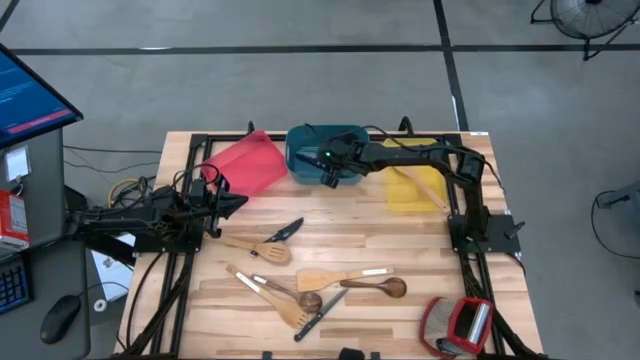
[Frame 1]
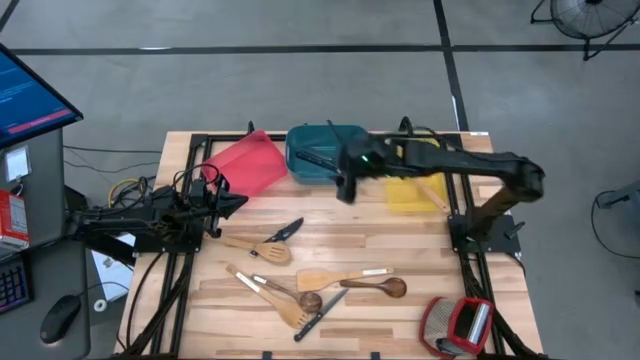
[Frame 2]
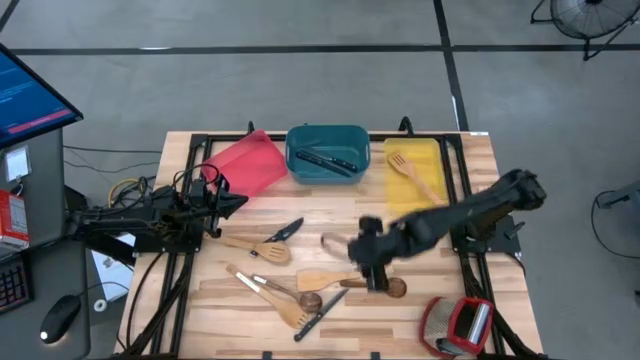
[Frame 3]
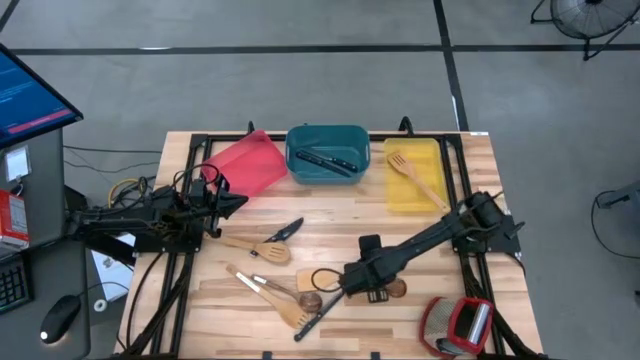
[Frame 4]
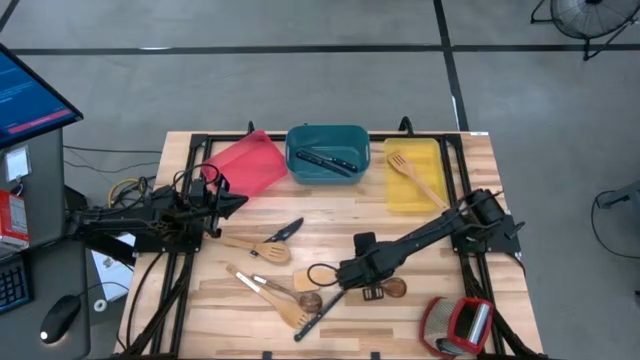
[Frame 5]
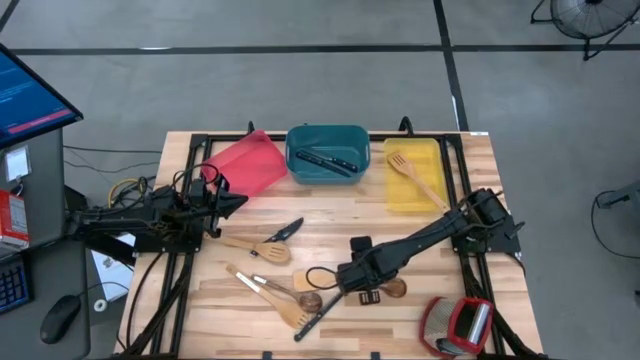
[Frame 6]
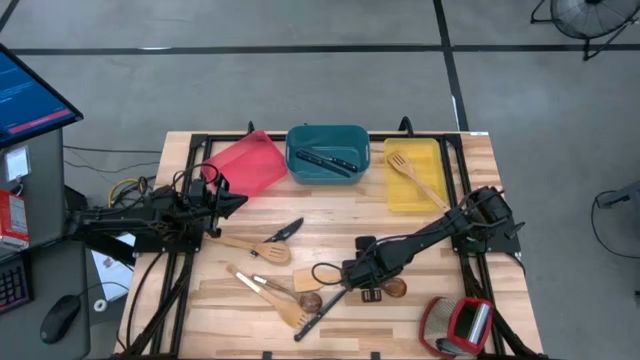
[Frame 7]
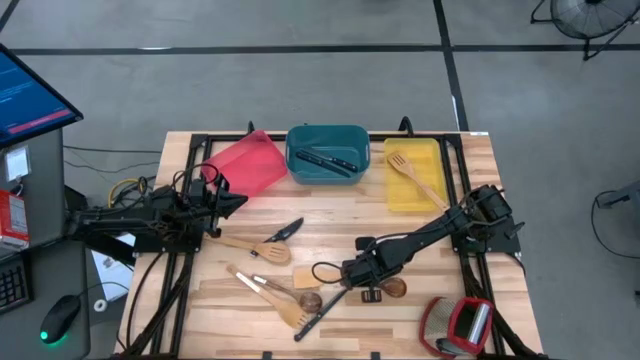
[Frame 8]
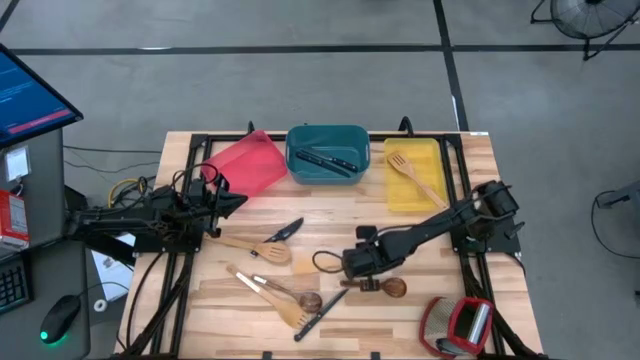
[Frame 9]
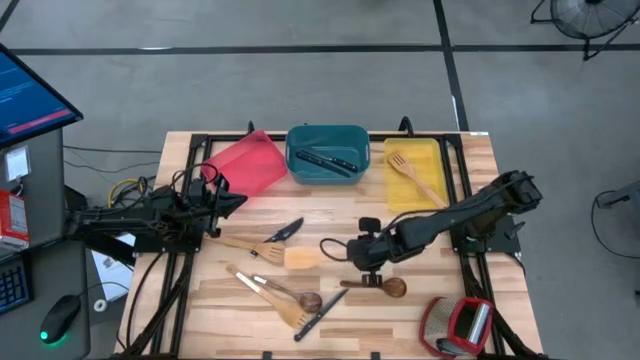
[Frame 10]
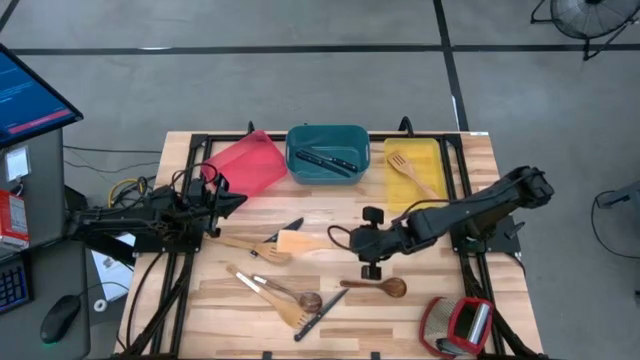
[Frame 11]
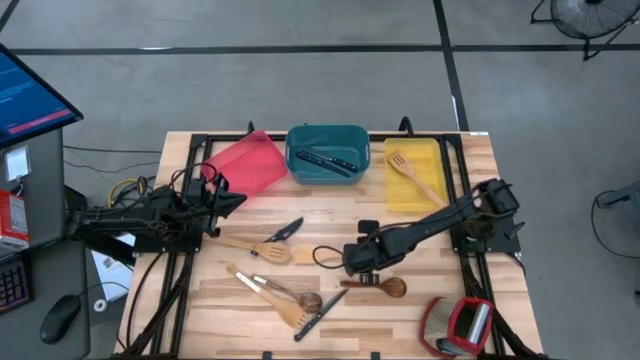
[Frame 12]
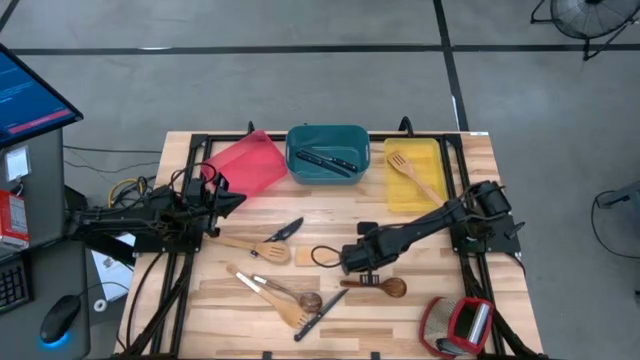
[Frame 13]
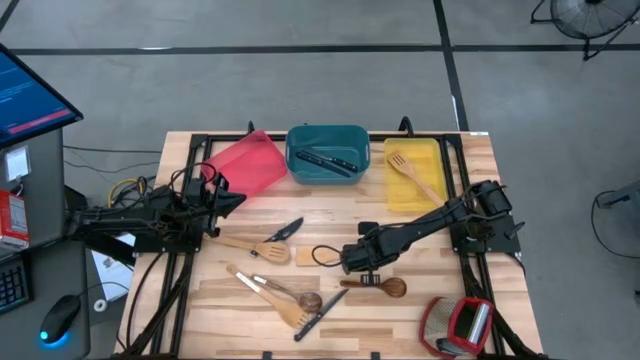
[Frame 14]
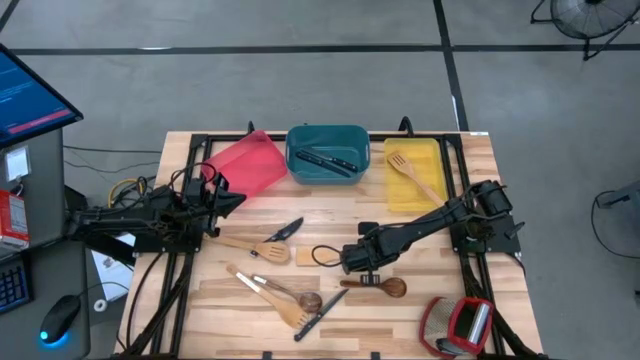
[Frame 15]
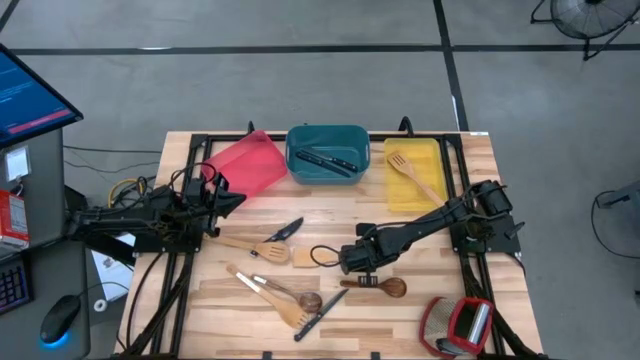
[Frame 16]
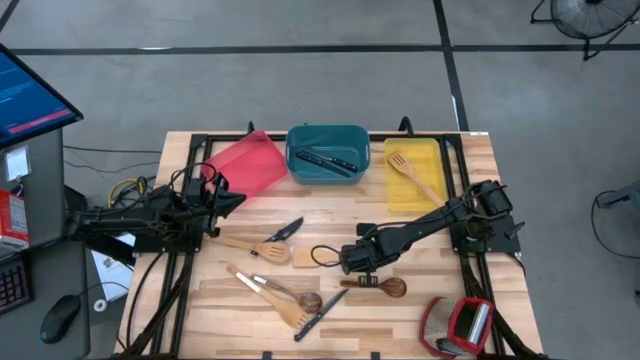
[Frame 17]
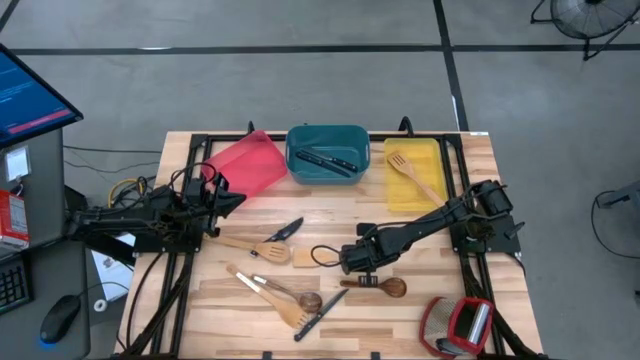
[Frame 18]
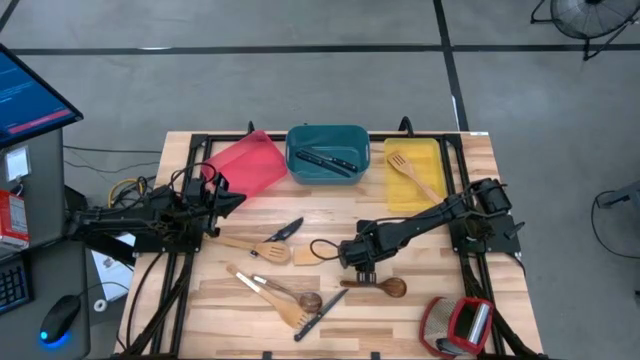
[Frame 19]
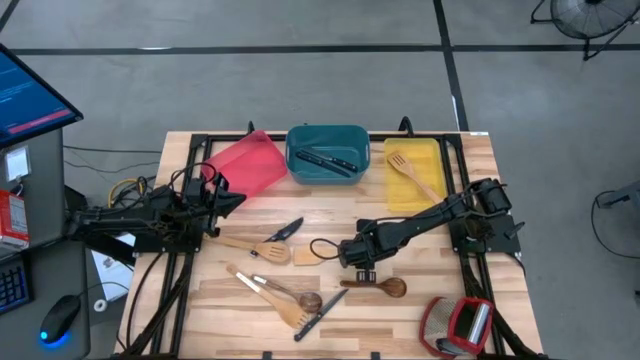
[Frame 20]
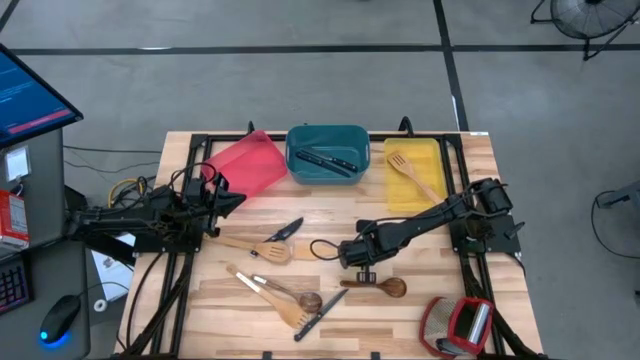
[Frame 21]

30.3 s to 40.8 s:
Task: Pick & Place Kitchen Items
Put the wooden spatula into the yellow bin

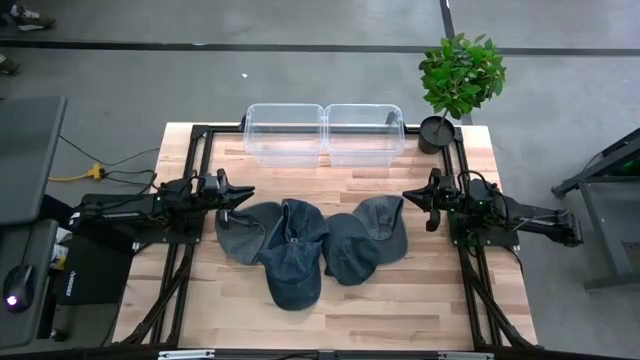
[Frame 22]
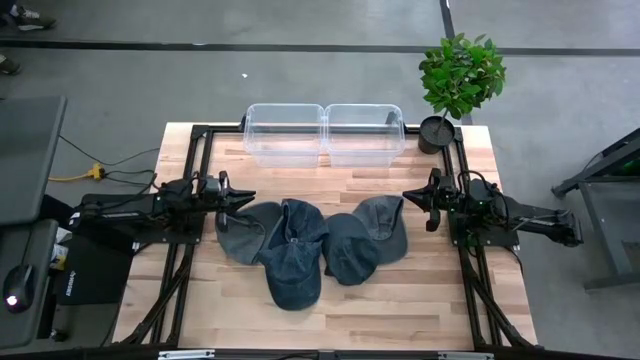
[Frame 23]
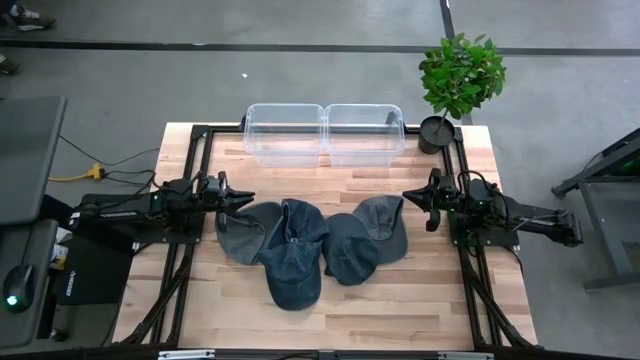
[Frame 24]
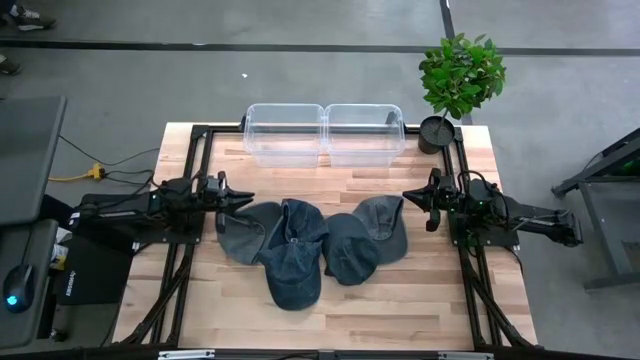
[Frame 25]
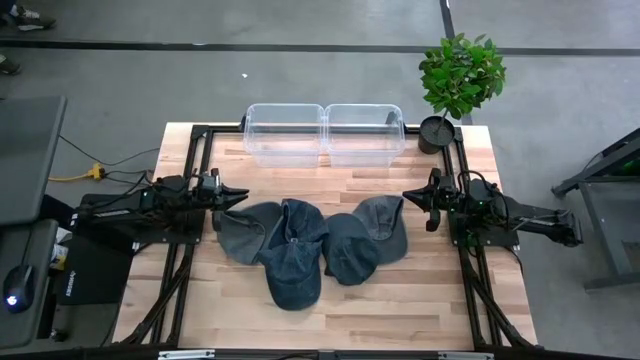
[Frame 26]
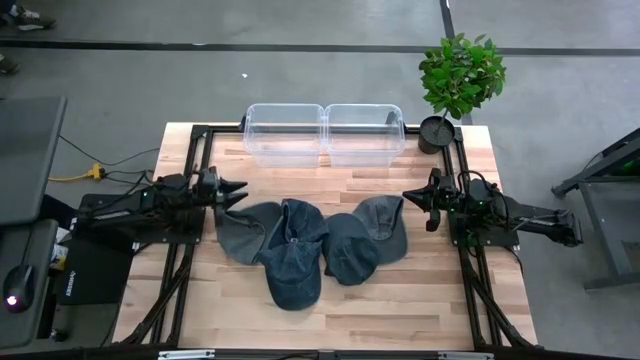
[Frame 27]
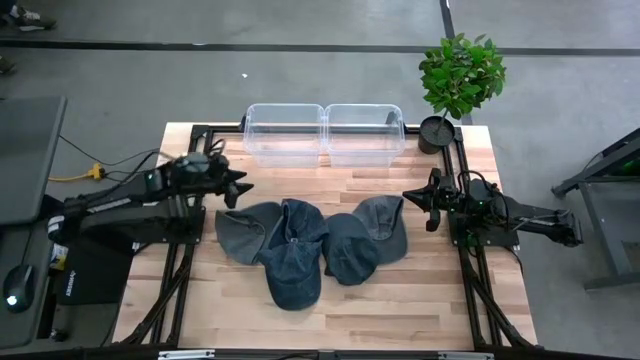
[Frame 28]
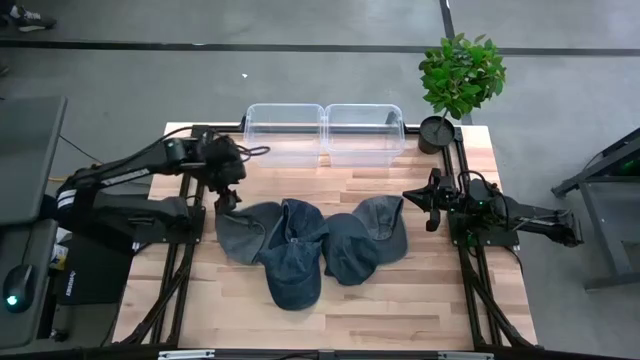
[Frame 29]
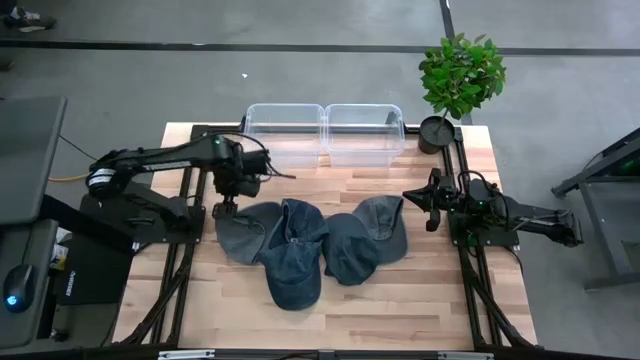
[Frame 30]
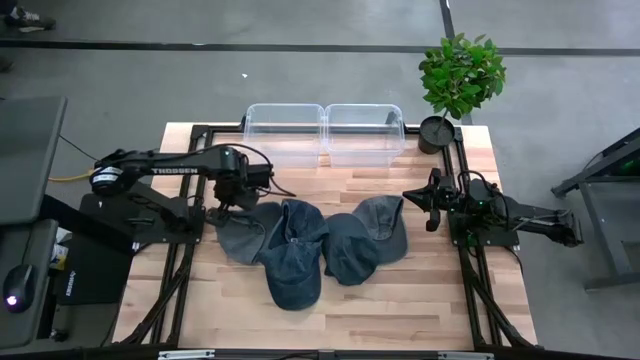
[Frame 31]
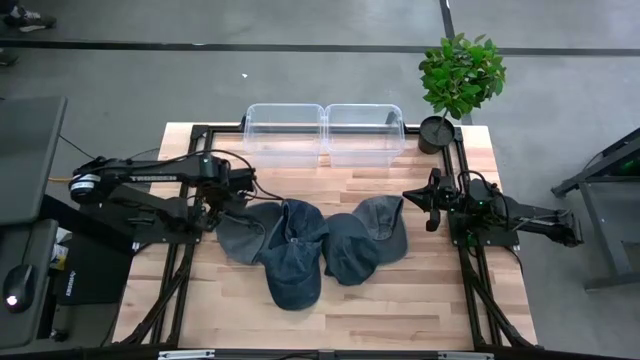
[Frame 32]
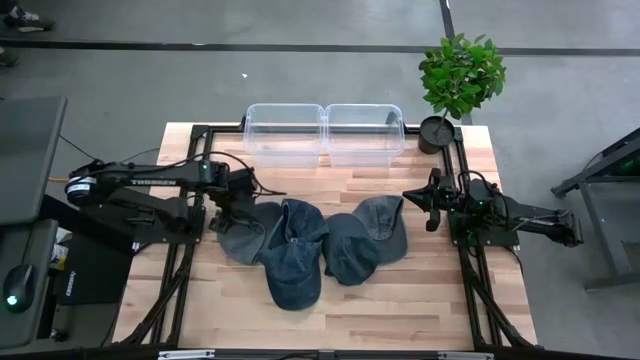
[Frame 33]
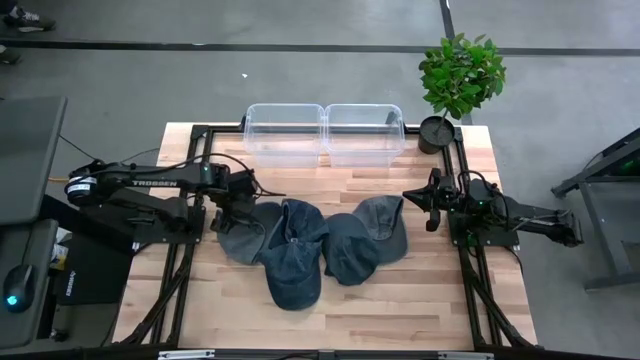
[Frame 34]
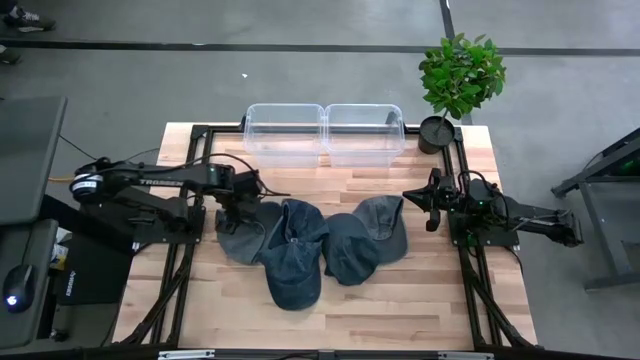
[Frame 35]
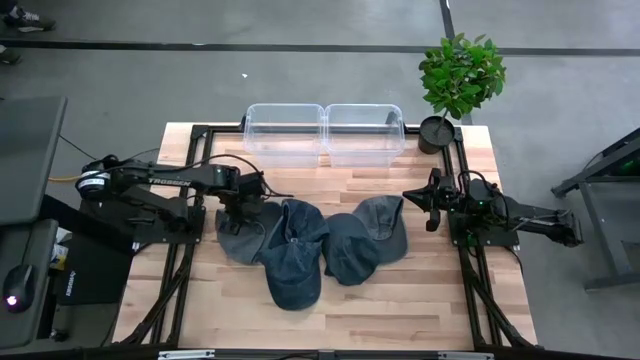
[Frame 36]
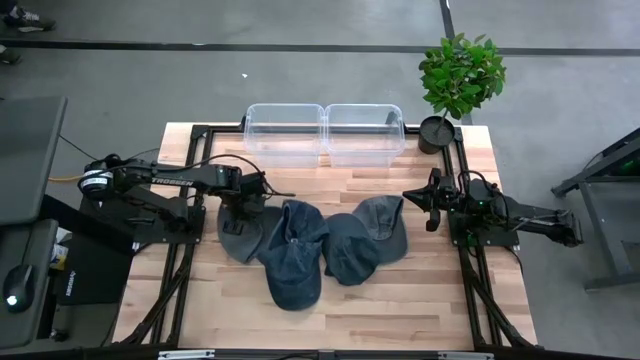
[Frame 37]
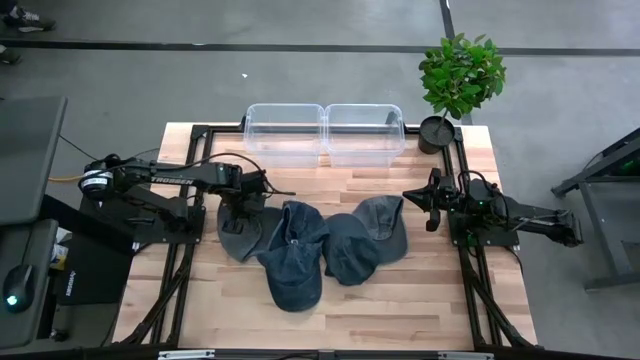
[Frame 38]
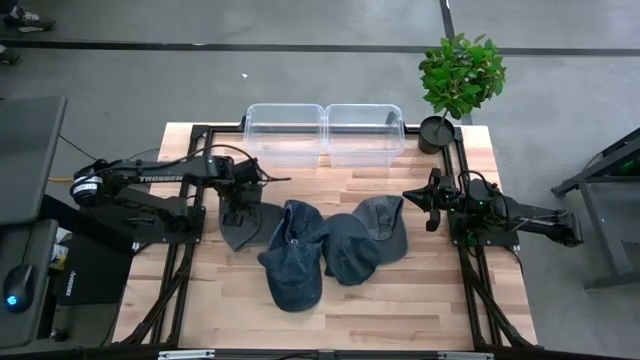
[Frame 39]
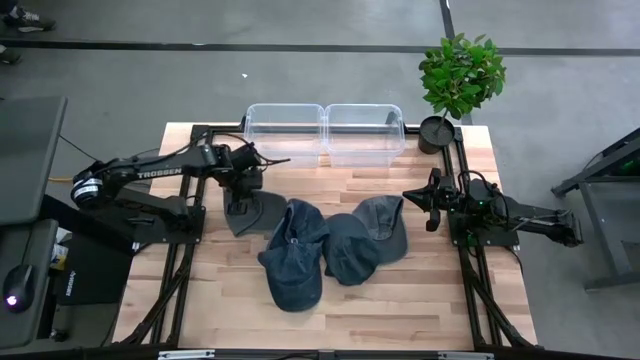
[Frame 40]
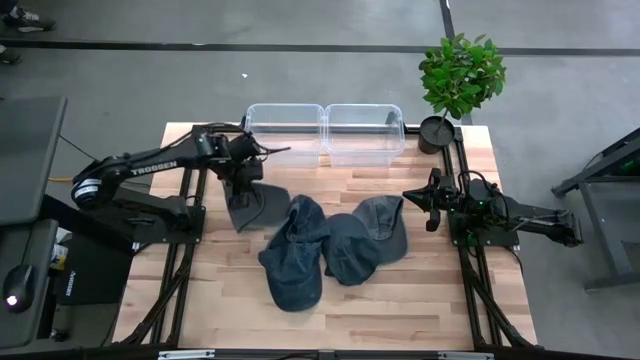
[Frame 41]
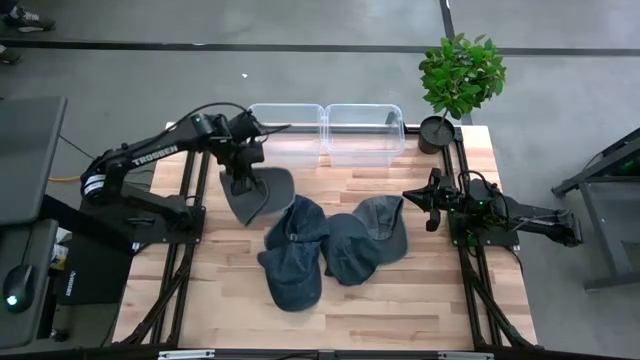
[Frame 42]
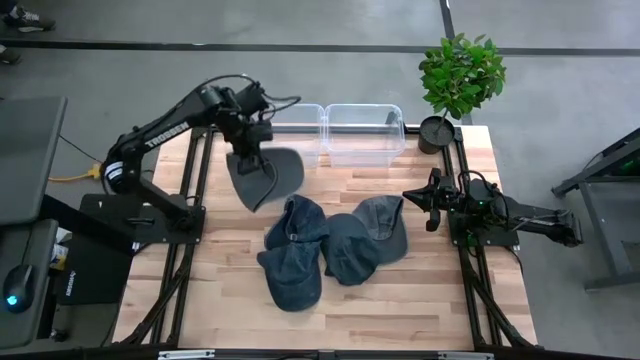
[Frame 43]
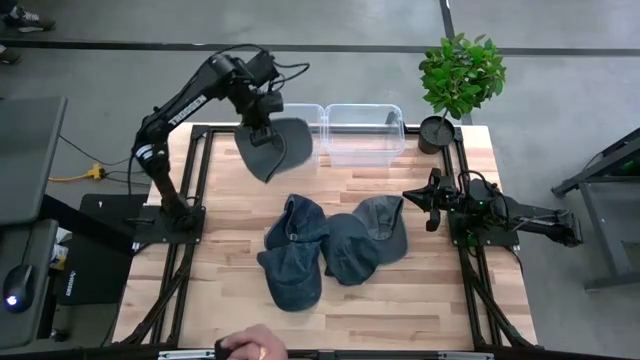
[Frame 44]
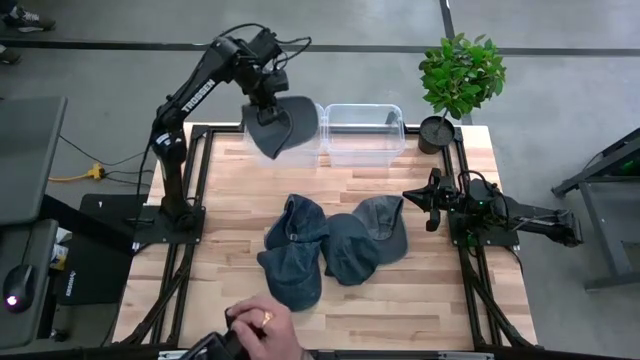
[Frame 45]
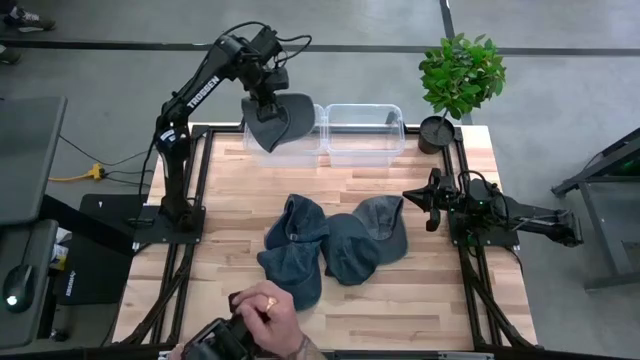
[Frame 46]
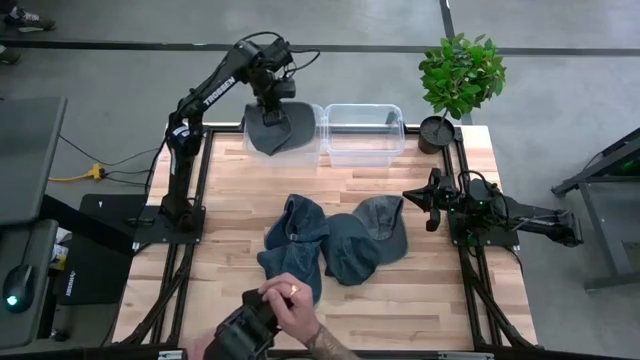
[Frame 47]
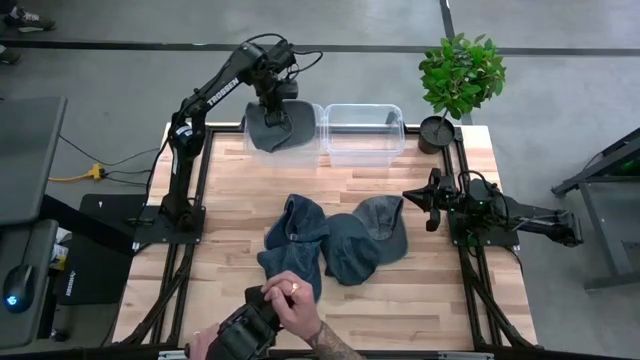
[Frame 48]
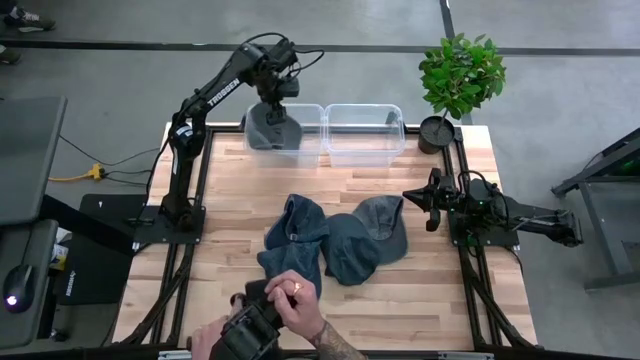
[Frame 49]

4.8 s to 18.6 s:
Task: Pick and place caps into container
Put the left gray cap into the left transparent container
